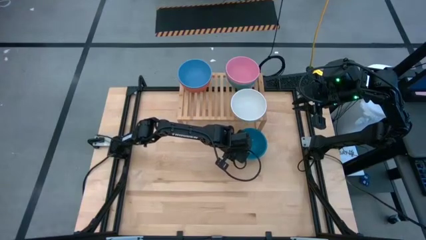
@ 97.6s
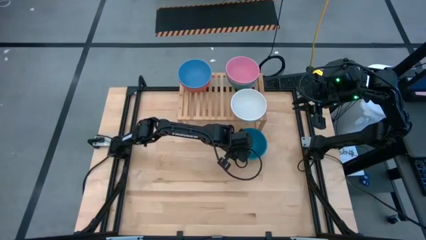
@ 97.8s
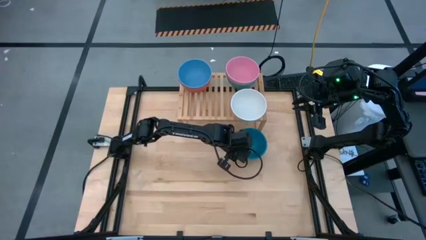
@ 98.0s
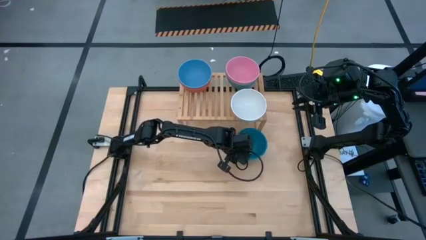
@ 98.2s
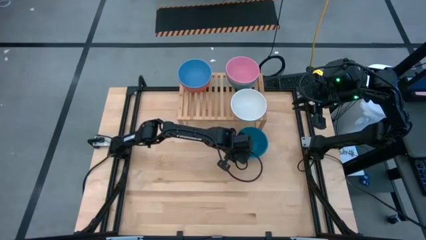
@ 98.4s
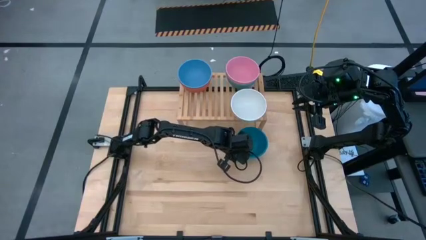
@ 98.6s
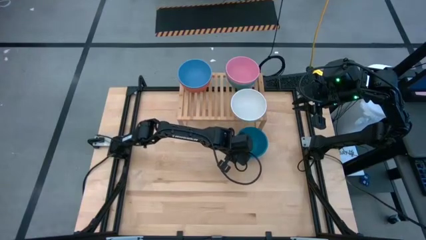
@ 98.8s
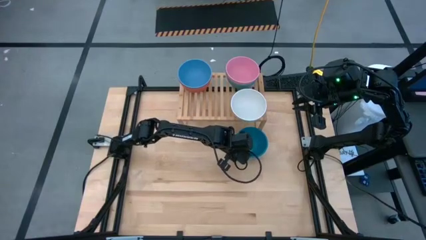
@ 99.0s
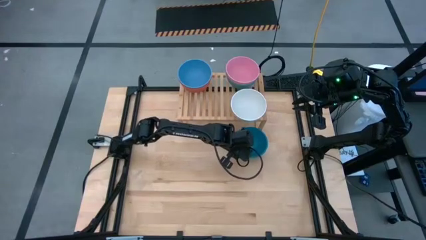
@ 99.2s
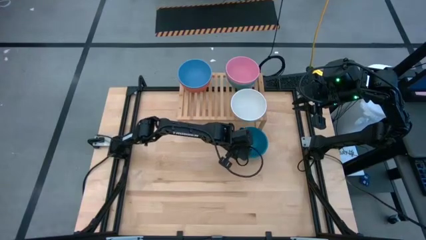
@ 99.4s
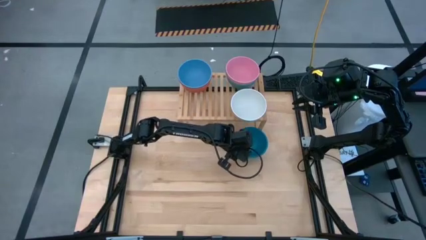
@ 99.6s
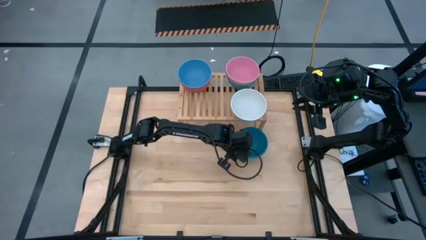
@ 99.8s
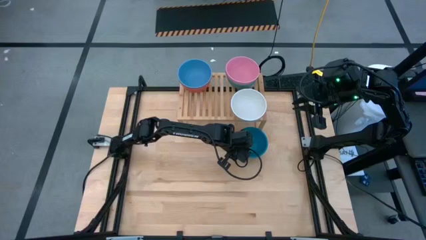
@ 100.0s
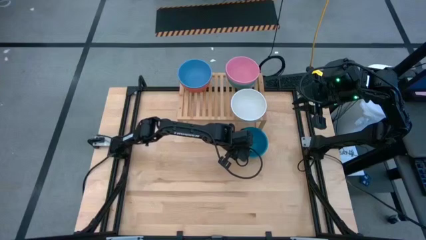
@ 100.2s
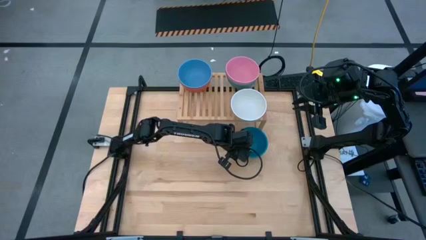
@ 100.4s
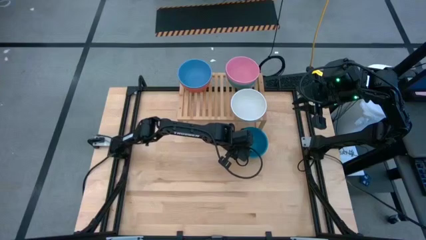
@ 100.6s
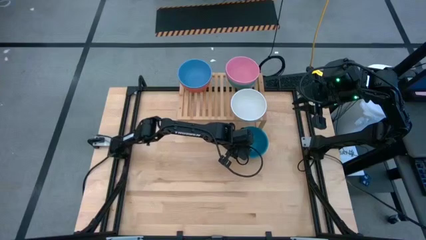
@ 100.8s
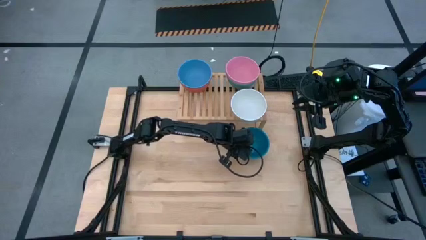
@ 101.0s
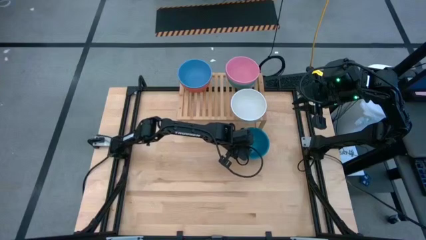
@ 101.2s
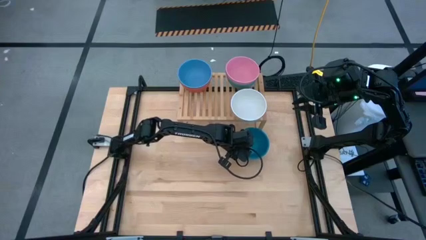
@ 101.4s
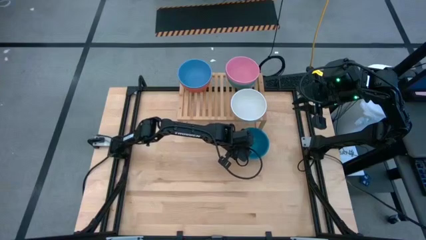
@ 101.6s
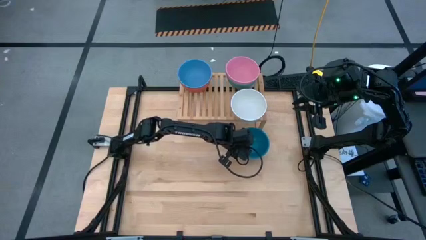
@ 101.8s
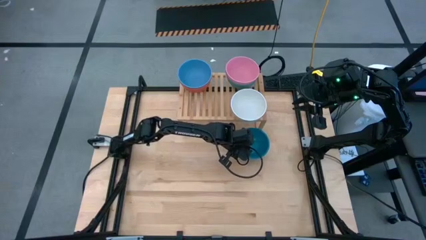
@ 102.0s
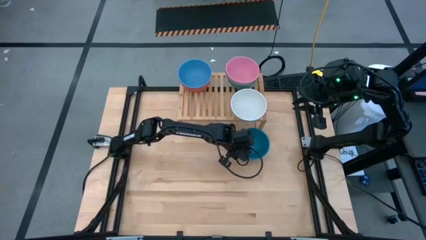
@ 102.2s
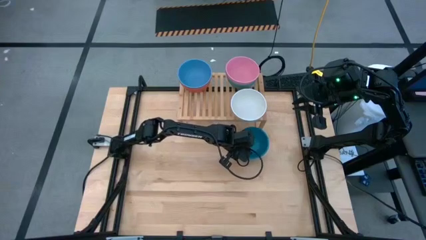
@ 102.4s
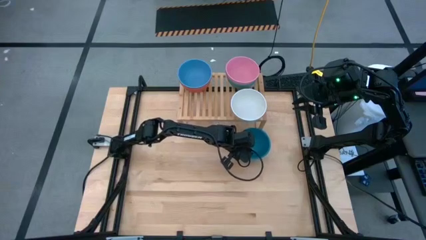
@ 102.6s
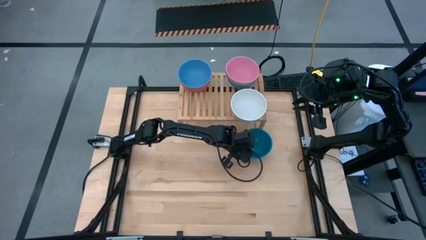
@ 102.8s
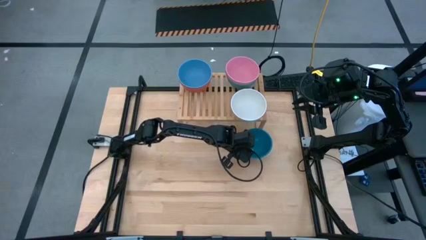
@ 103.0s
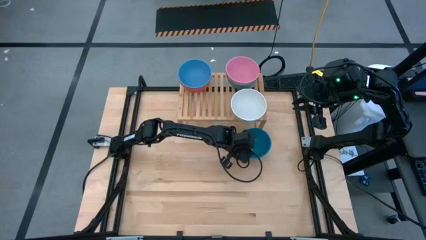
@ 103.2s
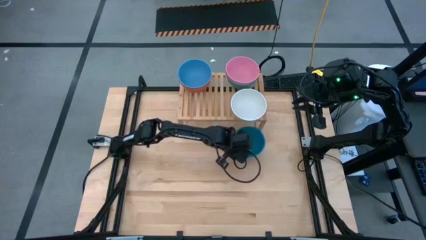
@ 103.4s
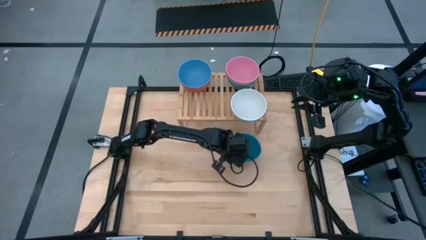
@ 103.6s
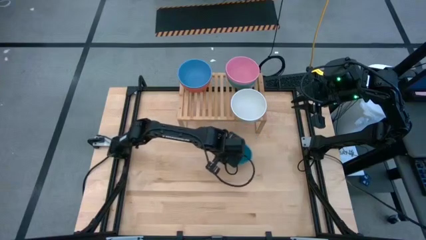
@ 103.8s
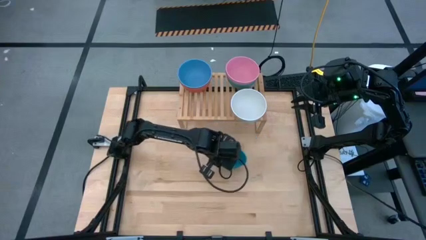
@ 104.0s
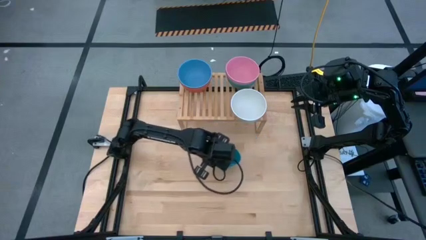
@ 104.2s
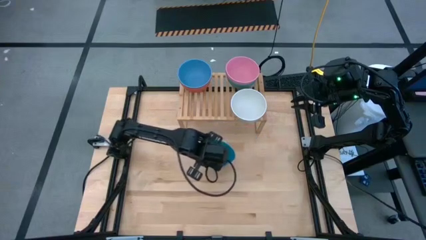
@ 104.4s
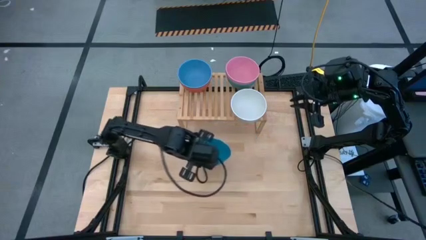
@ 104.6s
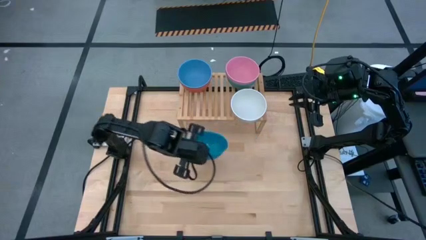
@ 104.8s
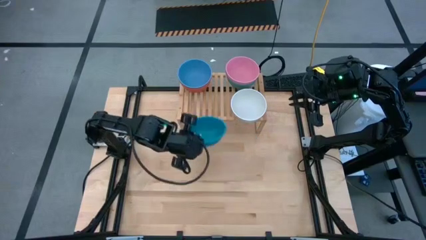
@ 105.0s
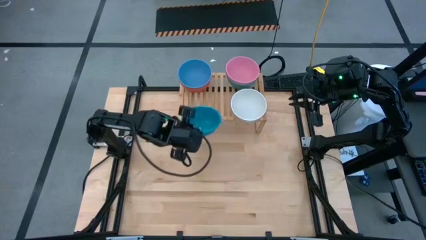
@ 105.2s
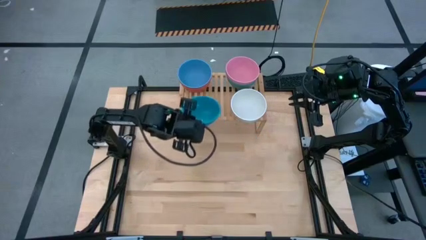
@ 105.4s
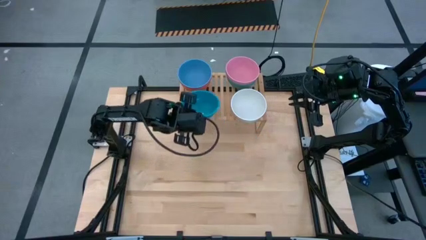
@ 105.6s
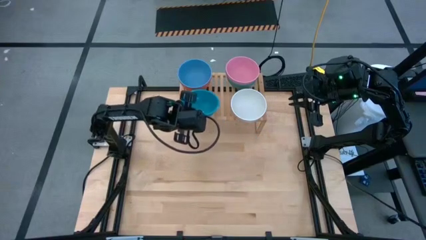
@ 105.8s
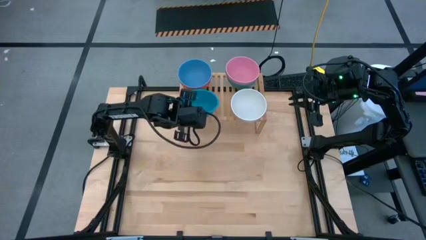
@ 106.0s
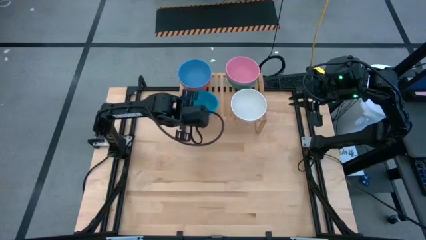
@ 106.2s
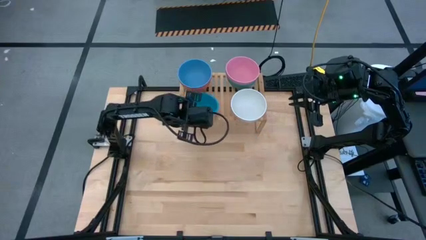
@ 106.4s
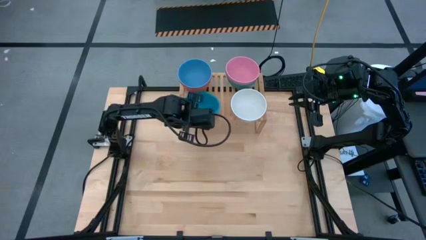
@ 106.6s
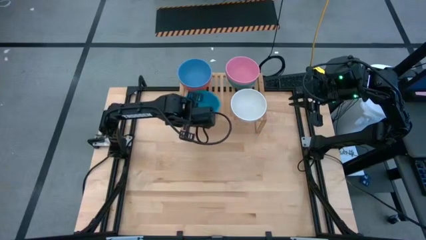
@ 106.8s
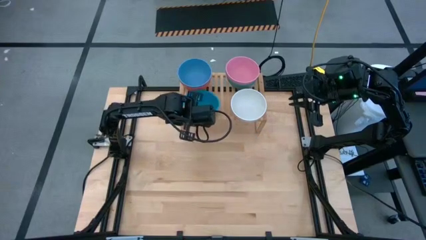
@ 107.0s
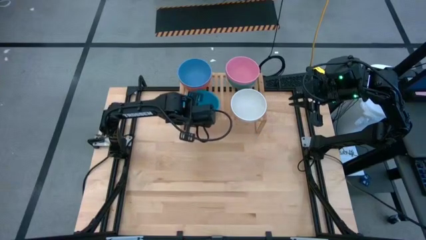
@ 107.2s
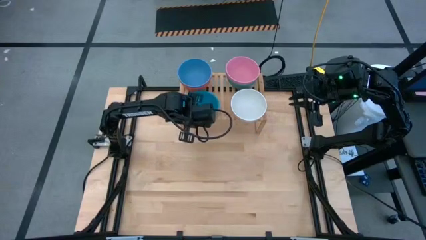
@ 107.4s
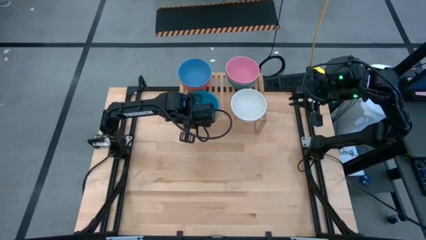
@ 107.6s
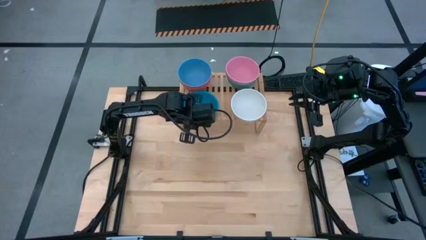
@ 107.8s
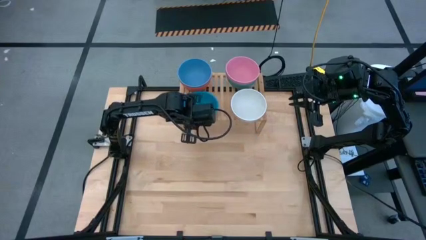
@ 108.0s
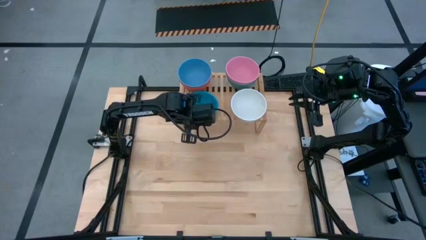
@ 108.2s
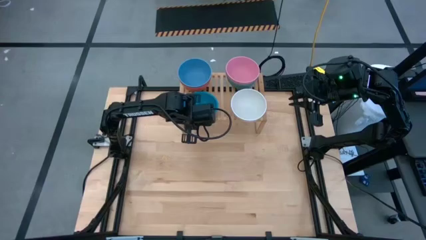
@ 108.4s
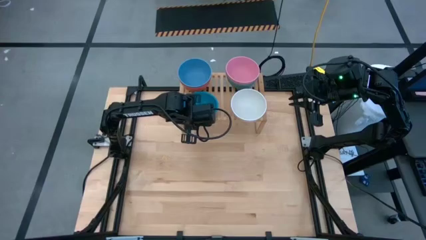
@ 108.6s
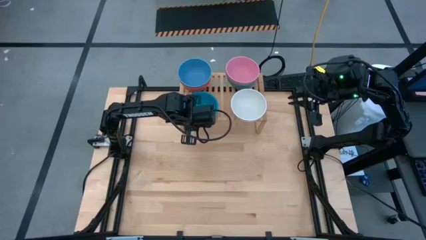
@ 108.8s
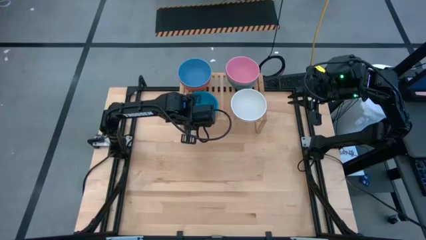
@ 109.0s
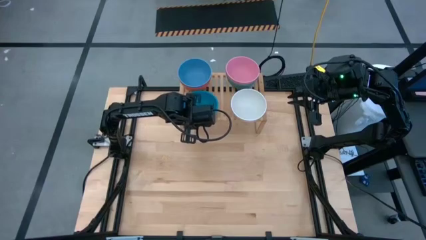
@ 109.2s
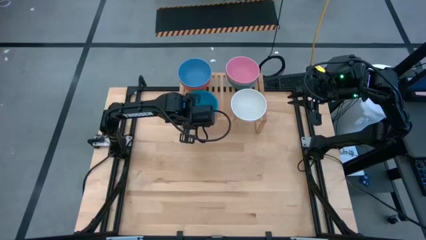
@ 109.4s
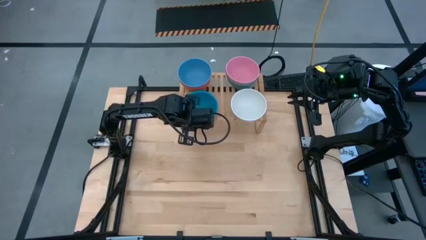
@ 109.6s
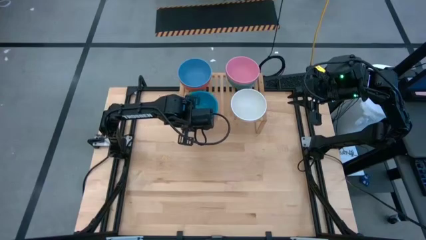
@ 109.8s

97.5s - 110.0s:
Task: Place and stack bowls onto a shelf
Put the dark blue bowl on the shelf
